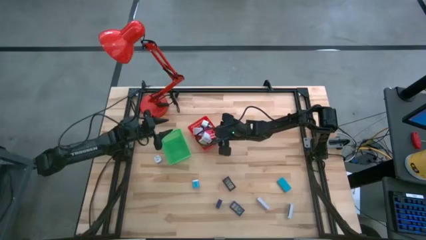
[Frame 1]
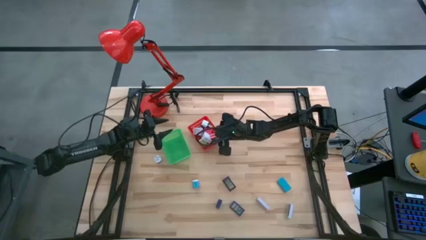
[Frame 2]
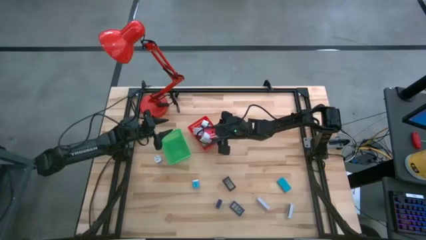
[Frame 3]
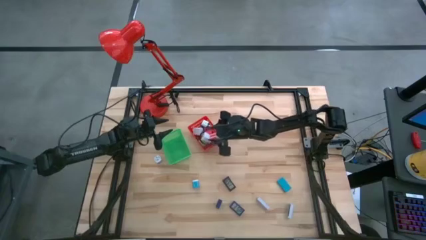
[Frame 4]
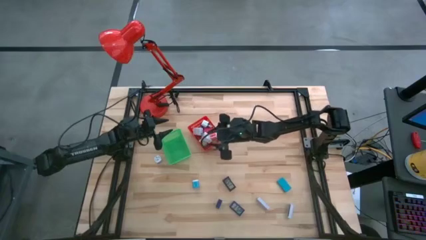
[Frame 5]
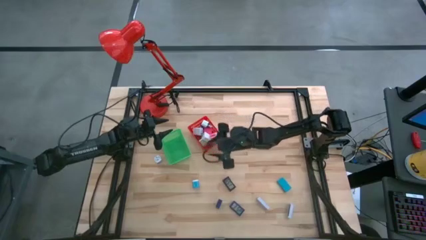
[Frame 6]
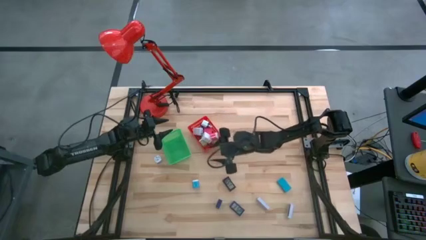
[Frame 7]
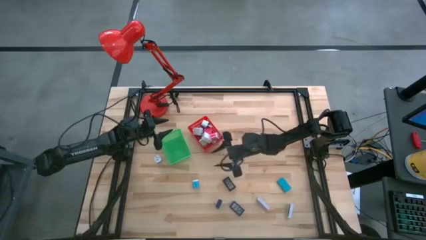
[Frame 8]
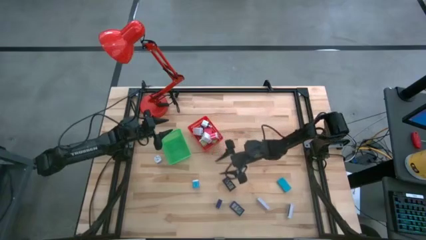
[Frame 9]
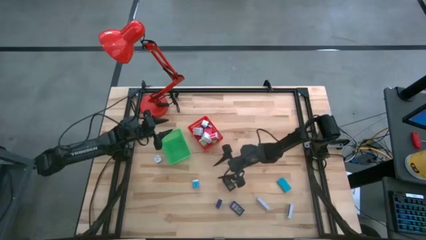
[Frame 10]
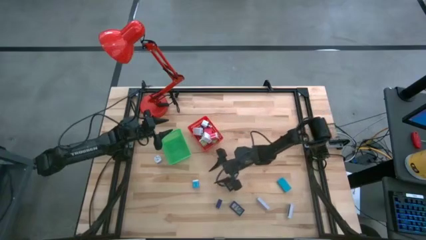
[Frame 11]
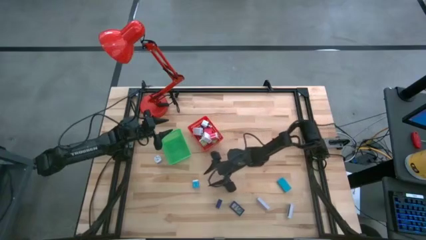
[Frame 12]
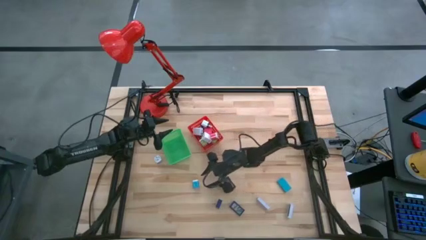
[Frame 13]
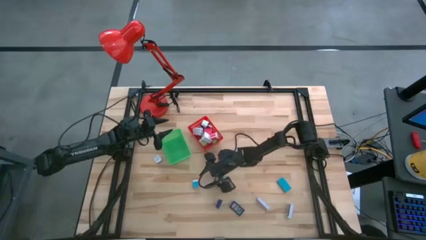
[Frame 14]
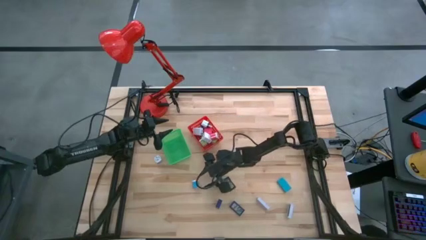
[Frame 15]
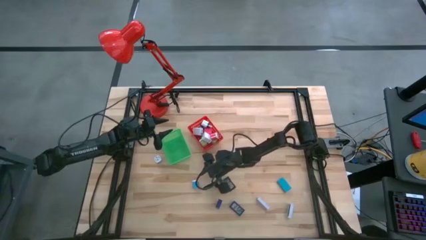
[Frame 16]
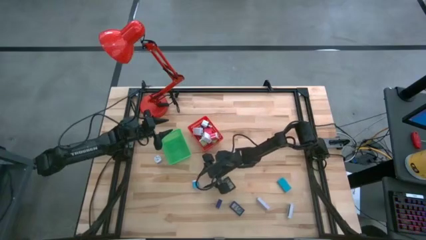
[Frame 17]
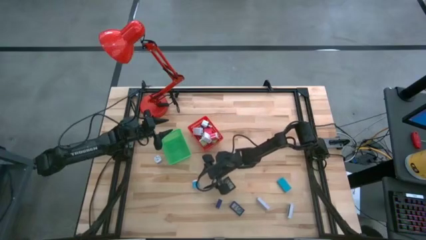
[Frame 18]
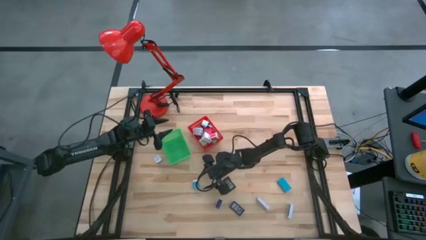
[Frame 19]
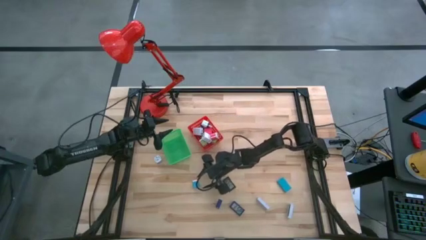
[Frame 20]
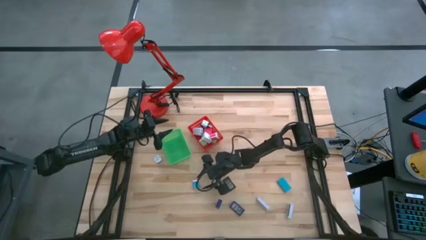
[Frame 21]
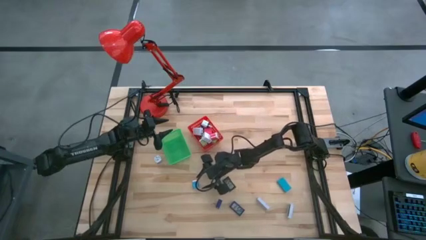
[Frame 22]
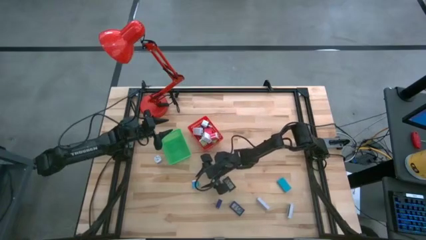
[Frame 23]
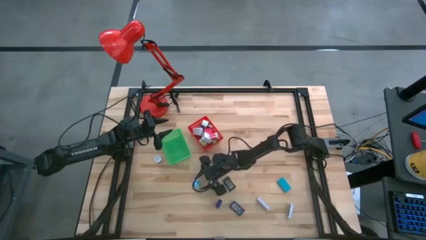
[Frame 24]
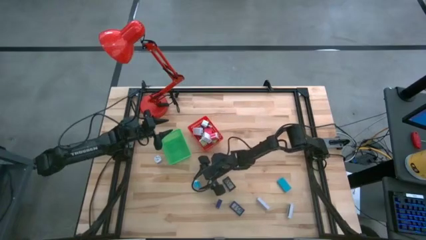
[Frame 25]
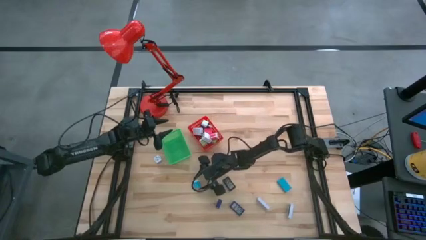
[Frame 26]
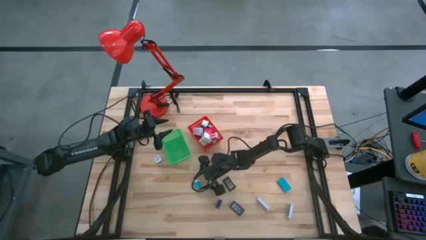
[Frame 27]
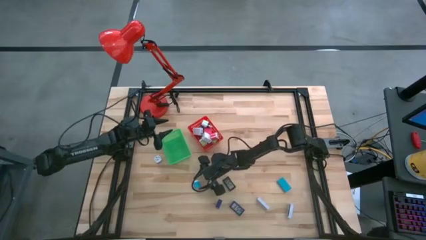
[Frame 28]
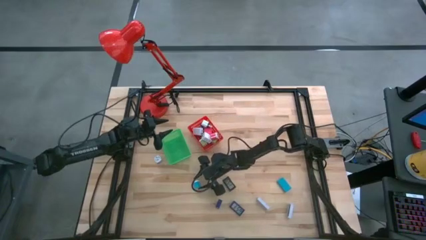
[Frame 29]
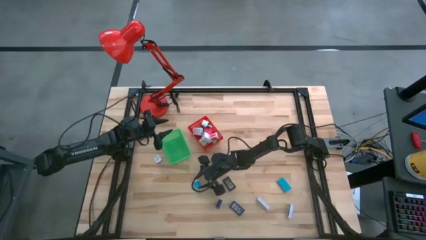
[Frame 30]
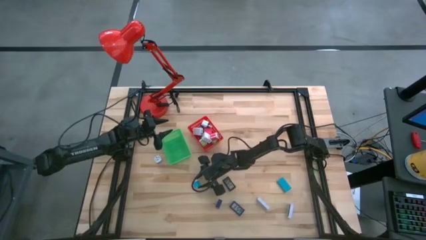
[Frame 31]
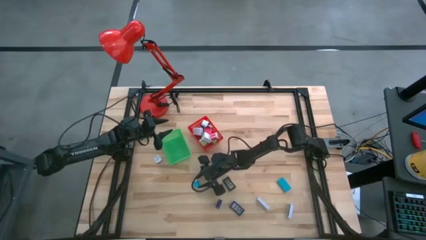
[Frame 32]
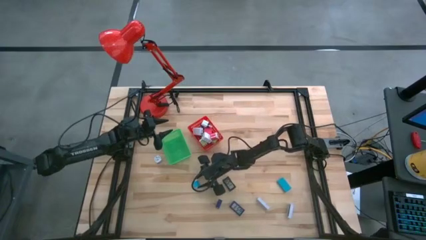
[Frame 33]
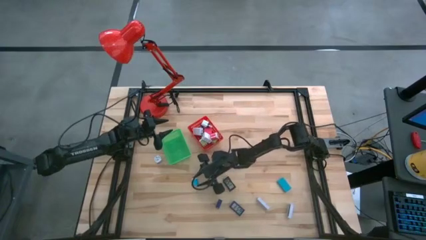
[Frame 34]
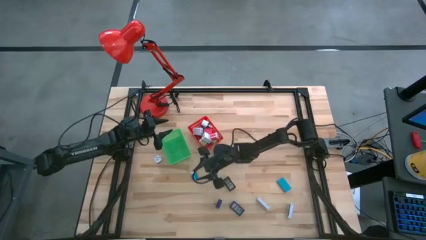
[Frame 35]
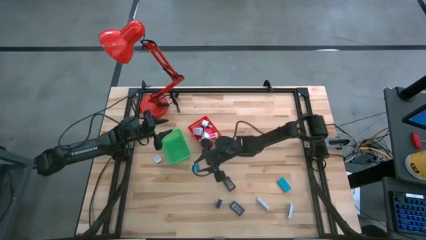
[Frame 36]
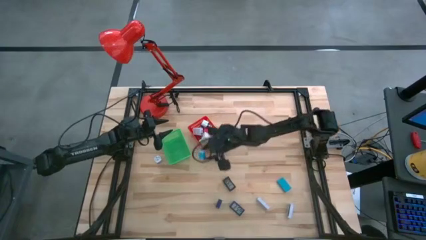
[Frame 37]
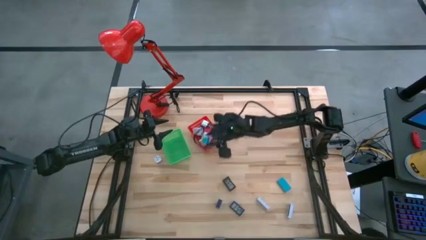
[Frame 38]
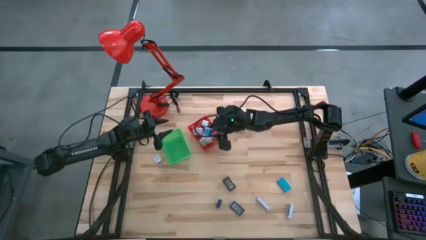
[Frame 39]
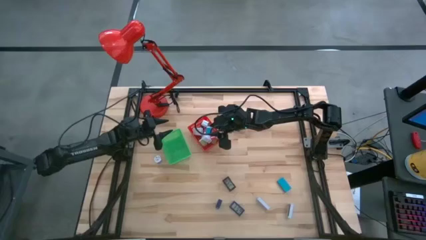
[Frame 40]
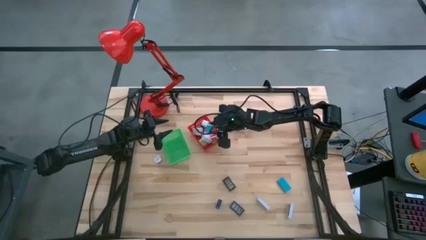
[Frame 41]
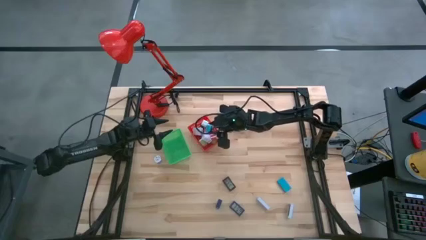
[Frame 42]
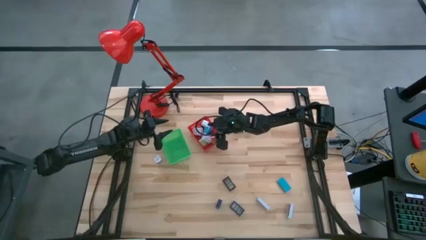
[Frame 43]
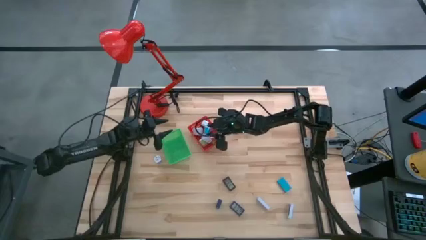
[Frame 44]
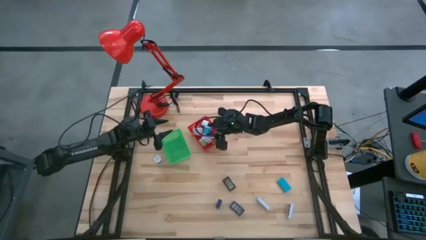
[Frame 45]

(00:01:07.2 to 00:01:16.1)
Task: Pick & Place Office items
Put the blue charger adapter into the red bin

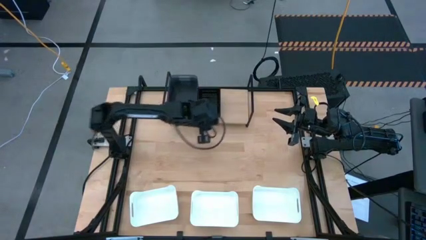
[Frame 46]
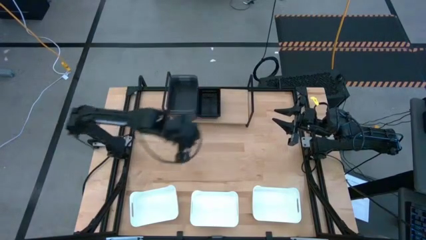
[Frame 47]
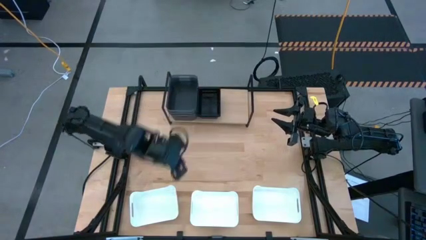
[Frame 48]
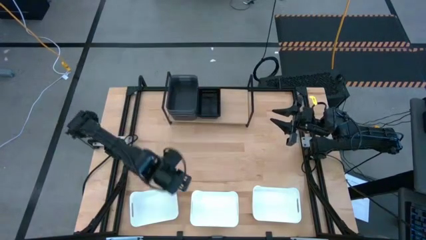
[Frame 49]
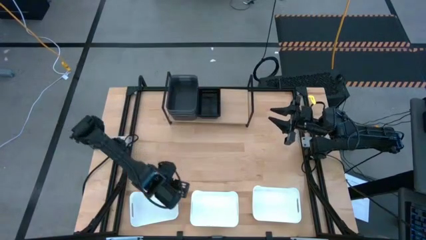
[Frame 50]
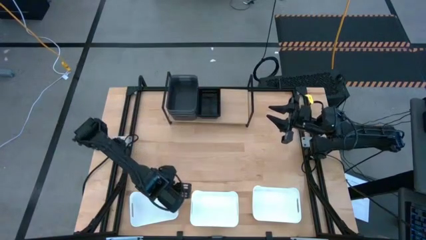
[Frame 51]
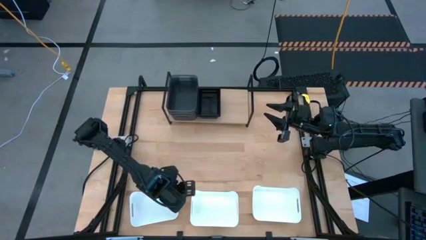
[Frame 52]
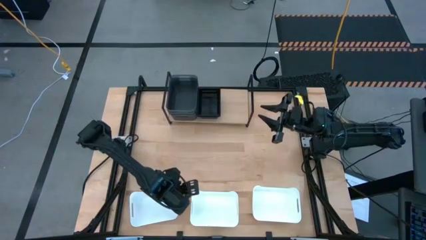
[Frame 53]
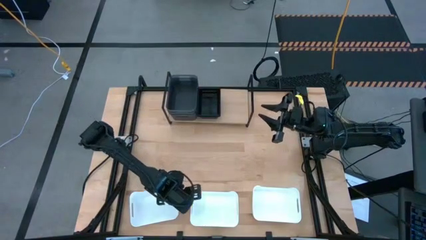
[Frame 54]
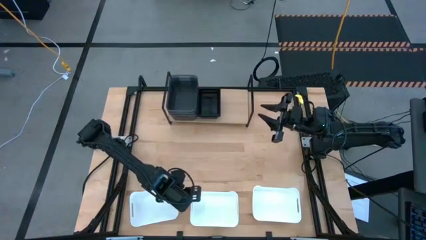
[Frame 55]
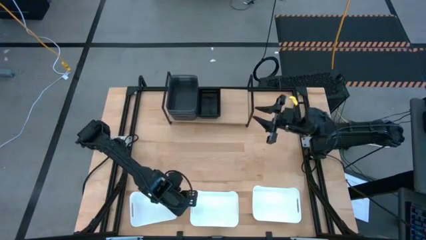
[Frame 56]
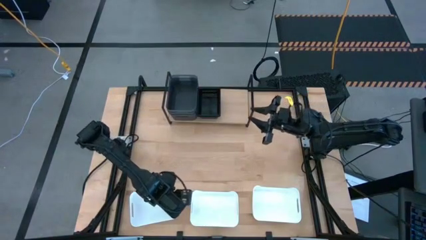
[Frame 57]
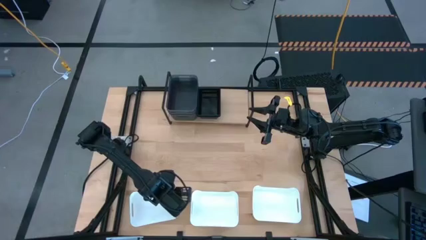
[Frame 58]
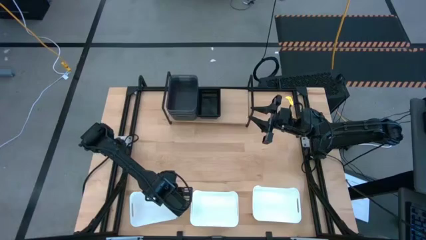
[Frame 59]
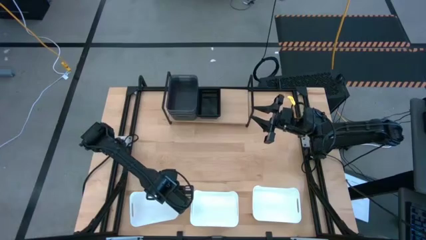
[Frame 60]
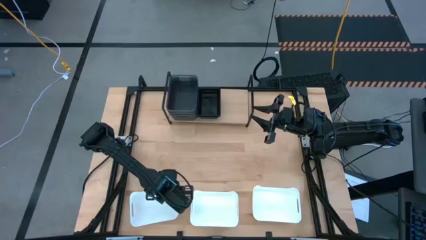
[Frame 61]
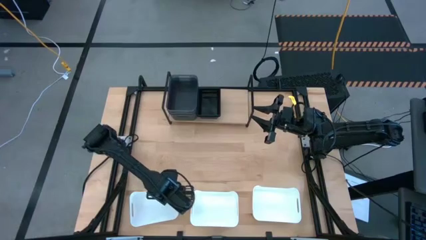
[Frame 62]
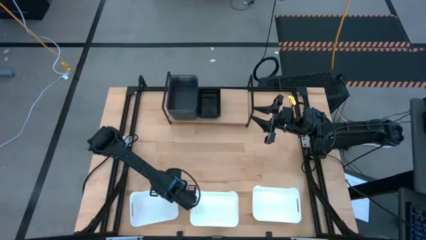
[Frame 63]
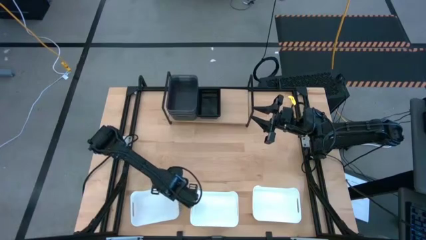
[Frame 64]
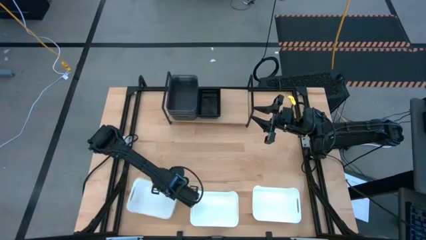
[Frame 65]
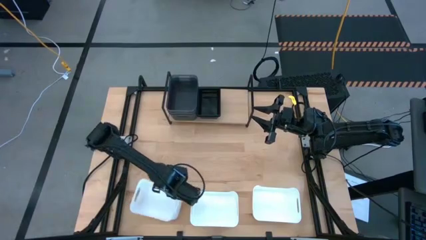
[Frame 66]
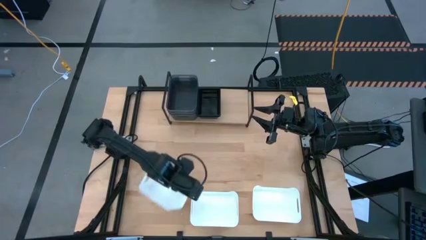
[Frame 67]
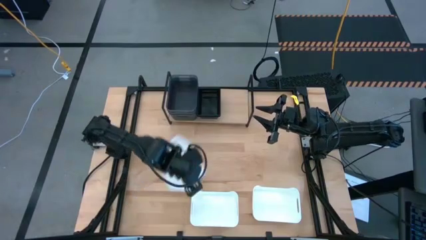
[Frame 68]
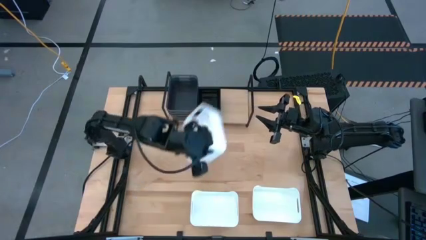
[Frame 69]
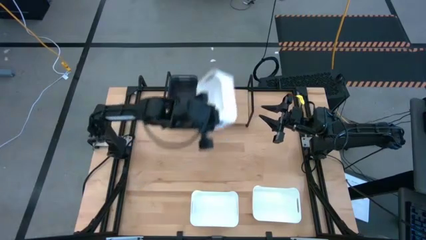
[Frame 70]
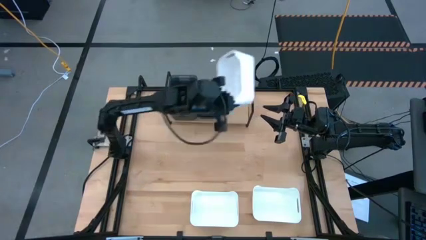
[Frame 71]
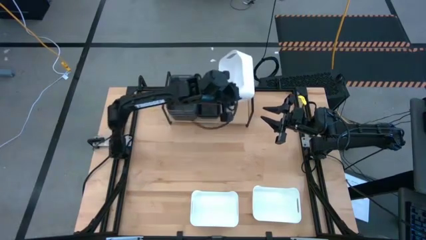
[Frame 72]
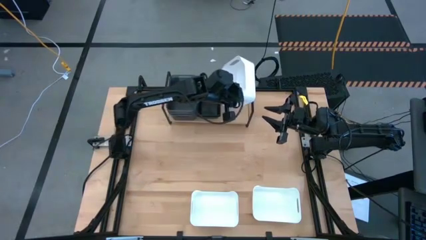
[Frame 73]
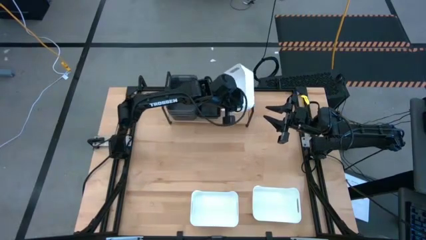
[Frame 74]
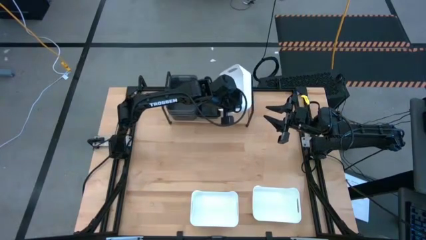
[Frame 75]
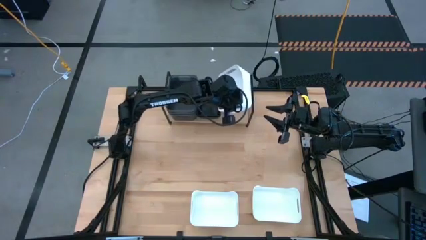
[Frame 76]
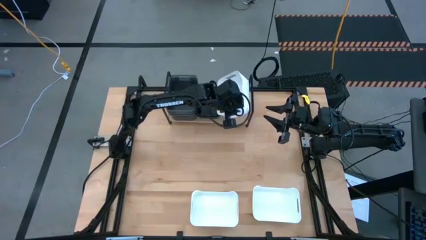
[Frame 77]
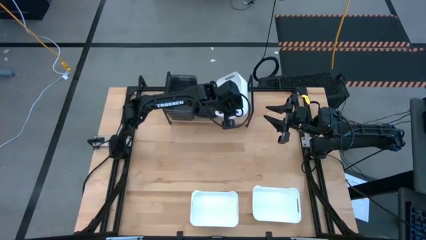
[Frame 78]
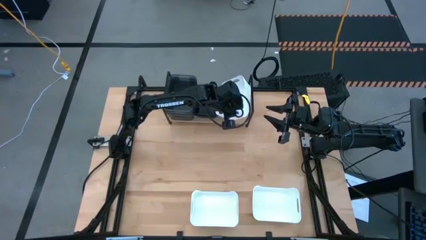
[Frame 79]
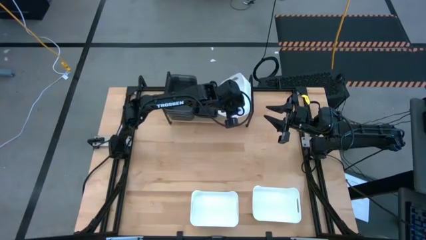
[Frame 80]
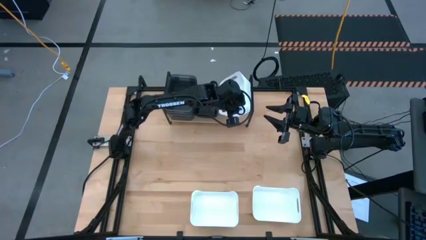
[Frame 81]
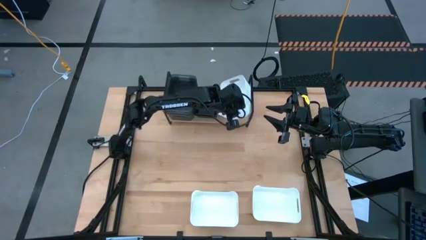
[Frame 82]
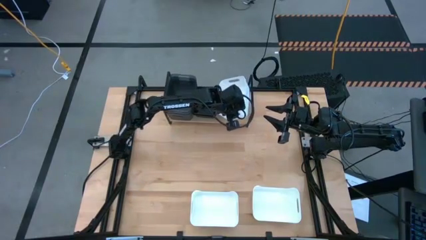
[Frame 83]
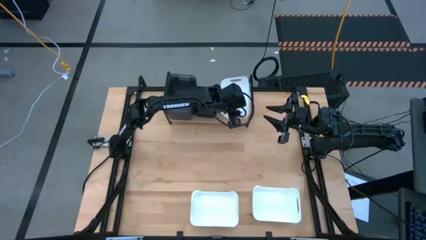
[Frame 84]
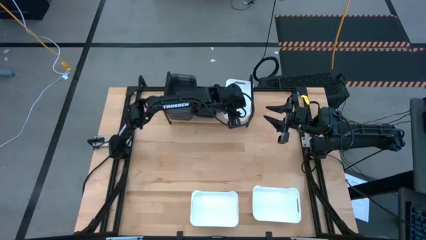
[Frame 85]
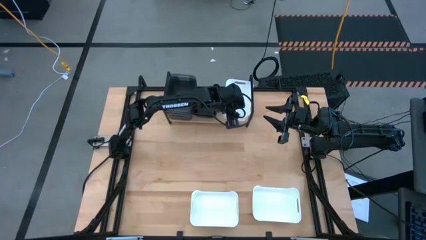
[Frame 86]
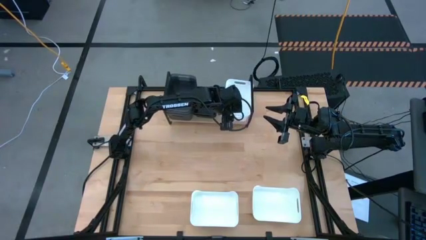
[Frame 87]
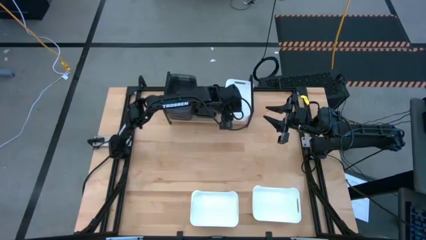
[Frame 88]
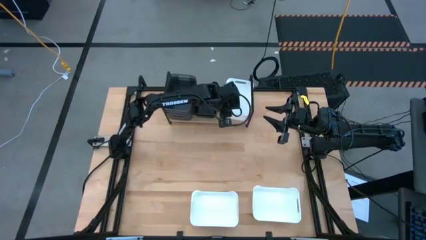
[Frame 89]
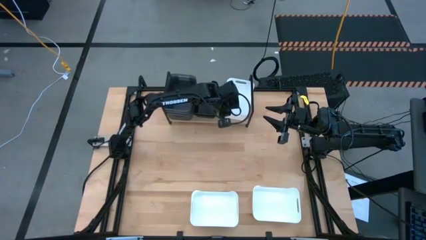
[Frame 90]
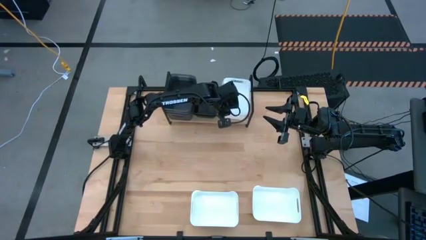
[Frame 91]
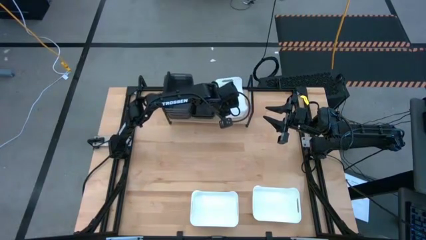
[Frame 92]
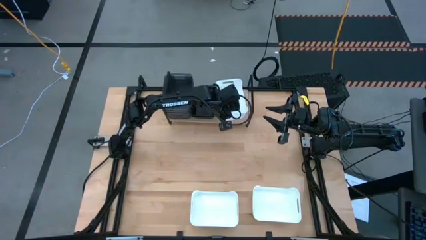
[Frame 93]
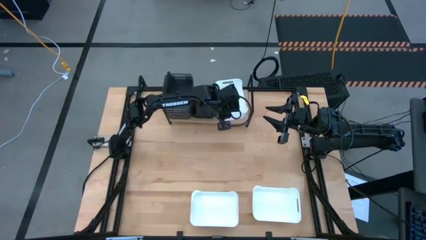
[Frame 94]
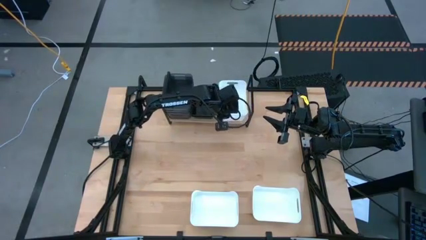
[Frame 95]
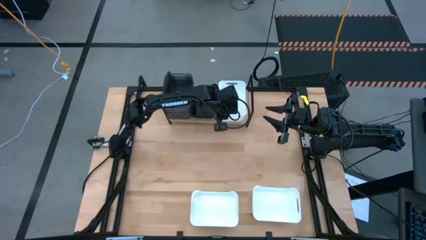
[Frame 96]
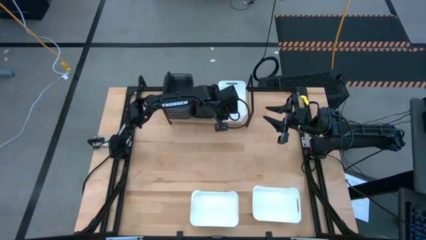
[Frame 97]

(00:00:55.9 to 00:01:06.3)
Task: Stack baskets on shelf by color
Put the bottom left white bin on the shelf
